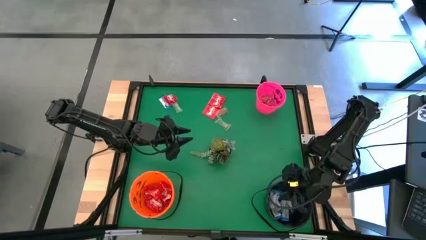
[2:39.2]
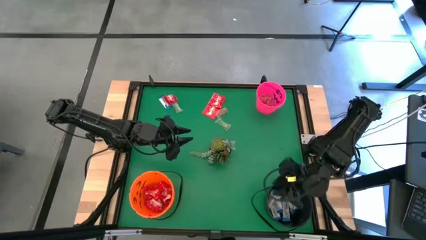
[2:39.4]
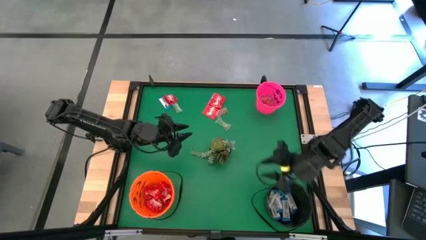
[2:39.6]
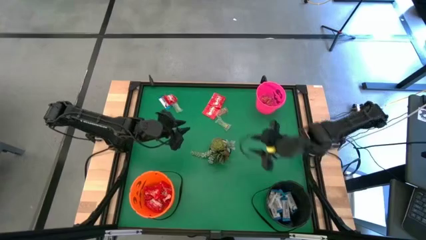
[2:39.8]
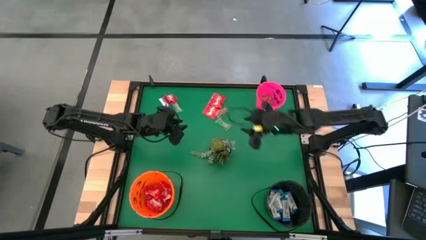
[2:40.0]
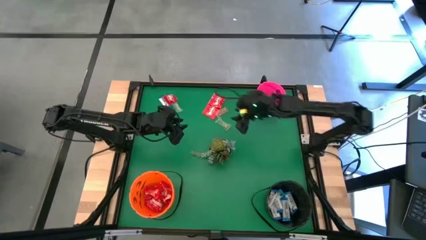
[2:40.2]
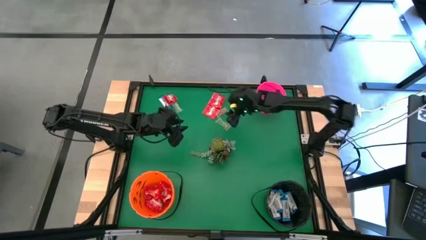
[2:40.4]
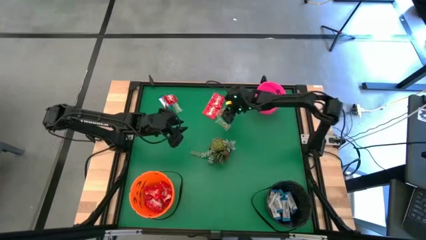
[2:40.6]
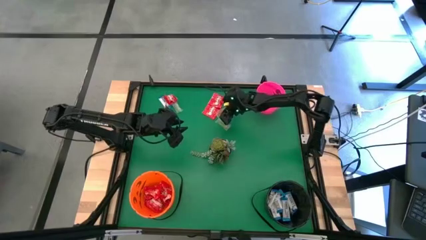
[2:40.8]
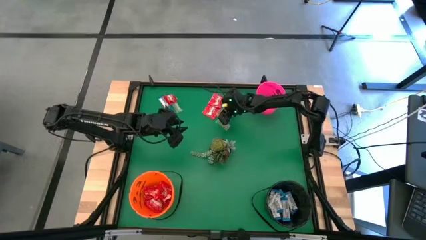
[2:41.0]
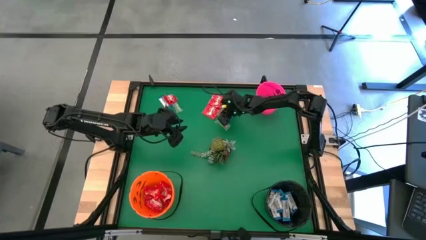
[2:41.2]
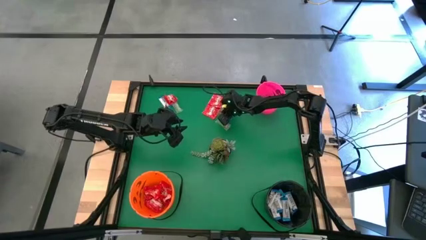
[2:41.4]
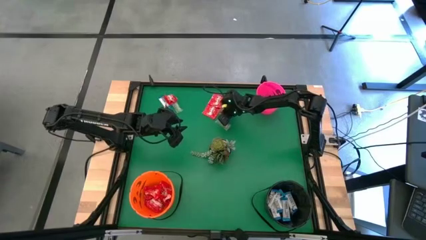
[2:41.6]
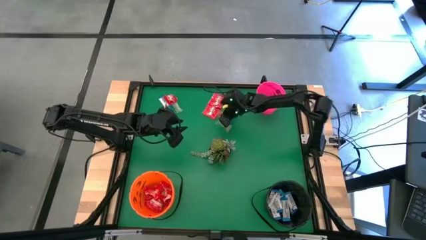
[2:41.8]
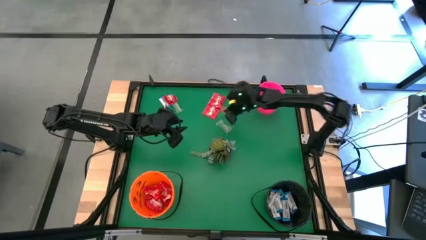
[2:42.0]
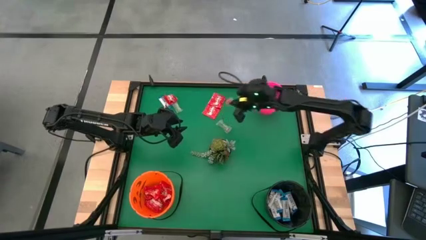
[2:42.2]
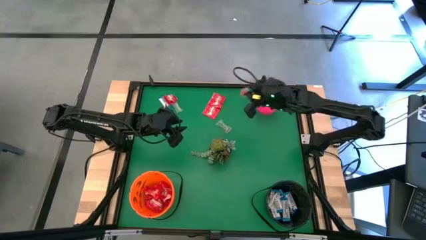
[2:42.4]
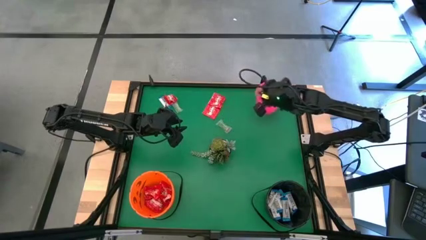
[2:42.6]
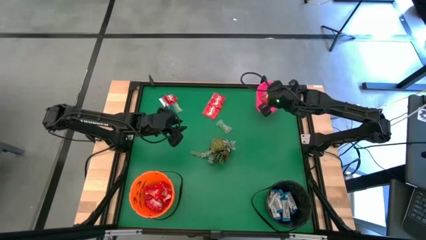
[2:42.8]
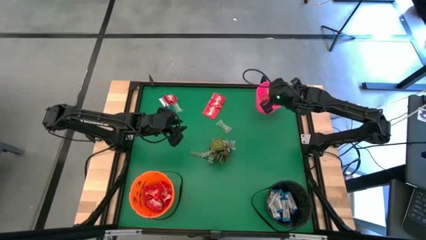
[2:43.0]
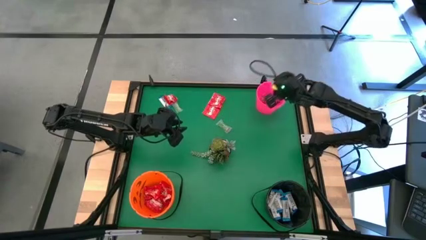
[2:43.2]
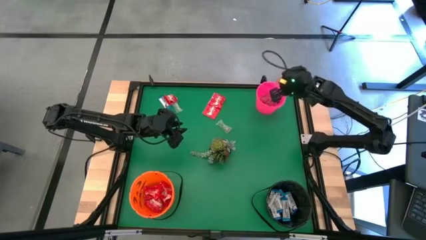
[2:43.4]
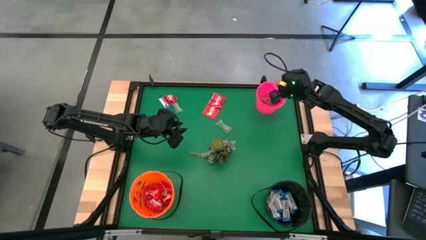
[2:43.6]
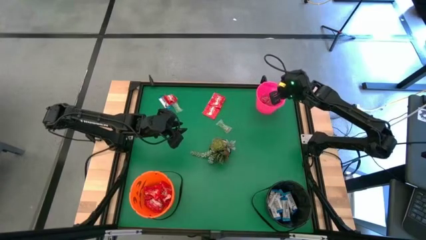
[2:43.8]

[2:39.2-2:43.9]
Task: Sort candy
Put the orange gummy into the pink bucket

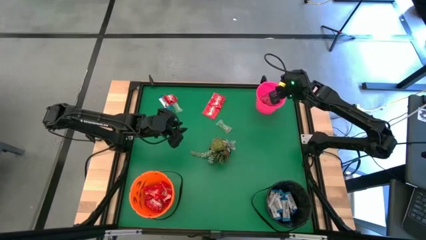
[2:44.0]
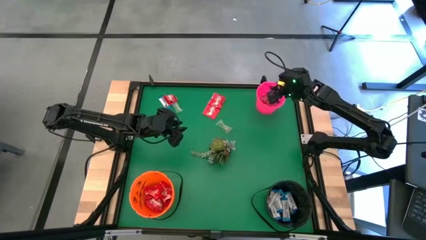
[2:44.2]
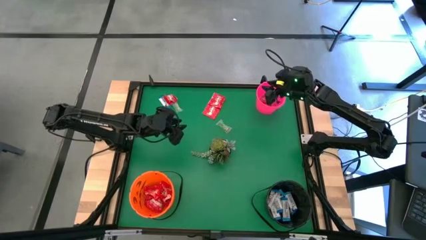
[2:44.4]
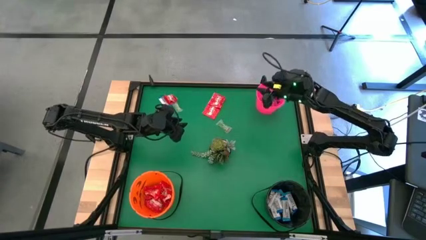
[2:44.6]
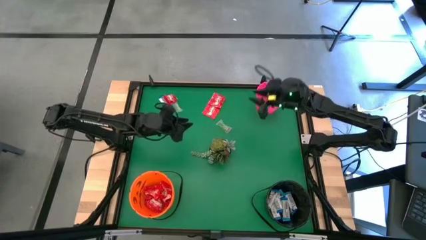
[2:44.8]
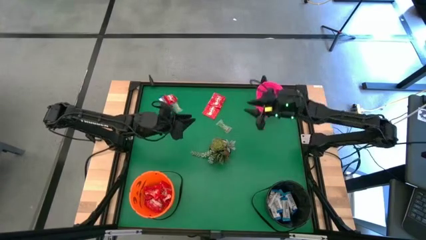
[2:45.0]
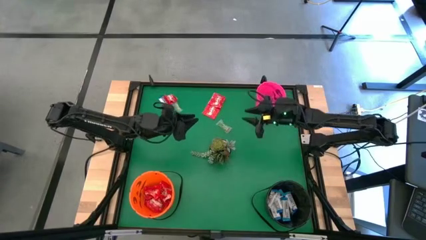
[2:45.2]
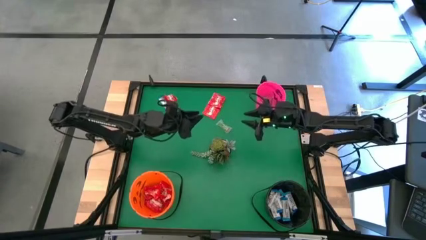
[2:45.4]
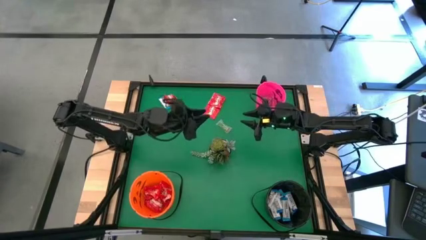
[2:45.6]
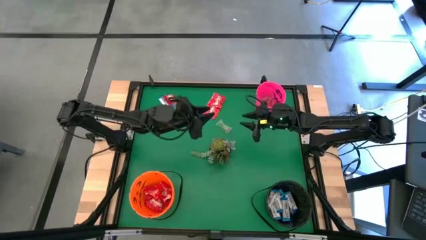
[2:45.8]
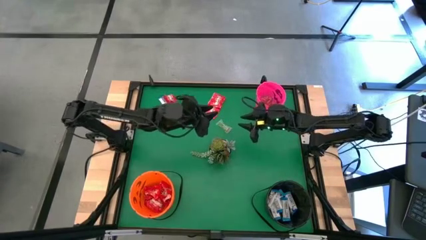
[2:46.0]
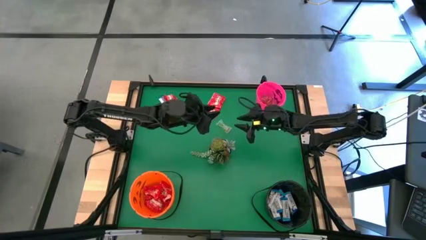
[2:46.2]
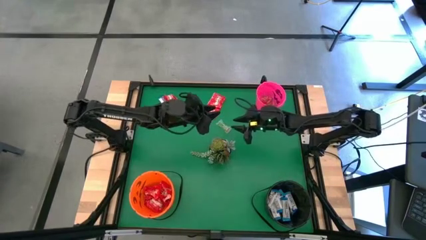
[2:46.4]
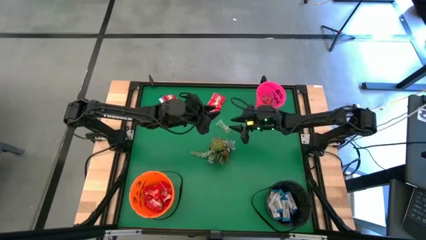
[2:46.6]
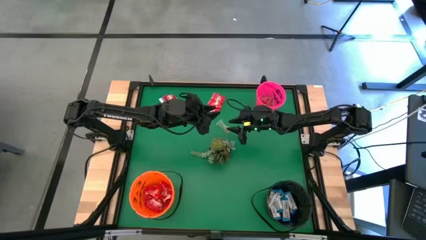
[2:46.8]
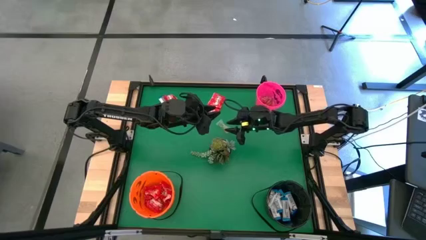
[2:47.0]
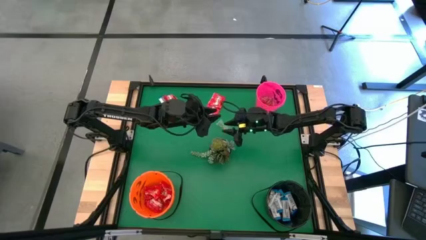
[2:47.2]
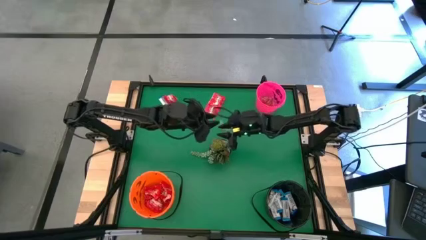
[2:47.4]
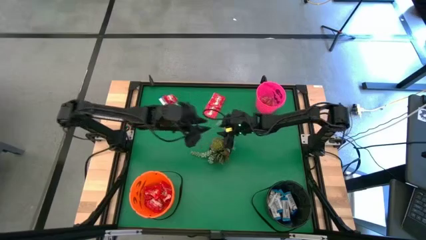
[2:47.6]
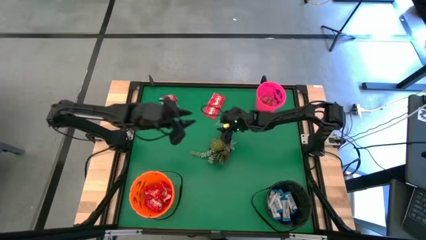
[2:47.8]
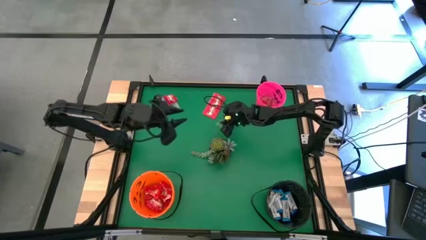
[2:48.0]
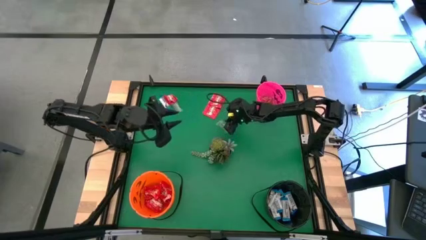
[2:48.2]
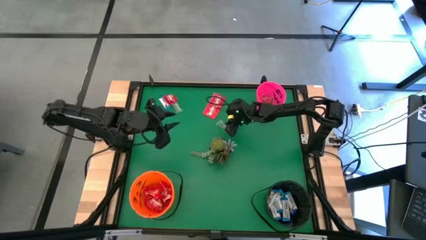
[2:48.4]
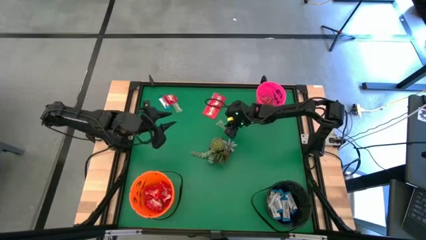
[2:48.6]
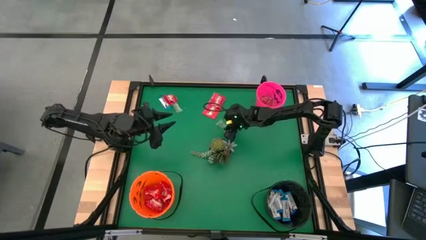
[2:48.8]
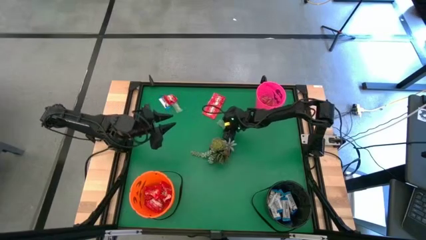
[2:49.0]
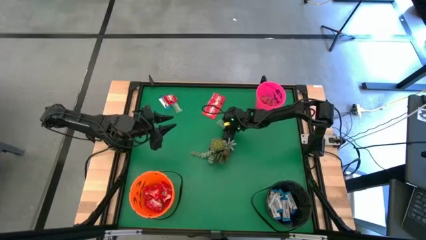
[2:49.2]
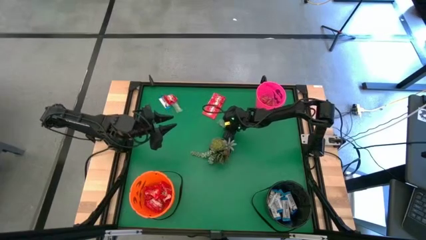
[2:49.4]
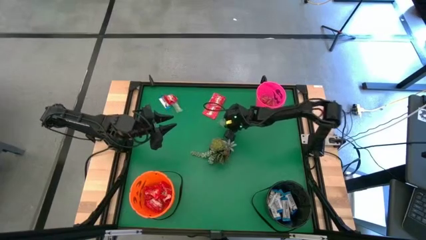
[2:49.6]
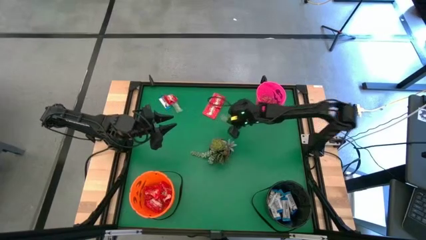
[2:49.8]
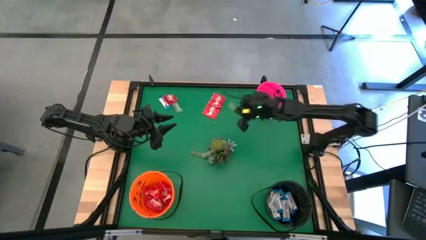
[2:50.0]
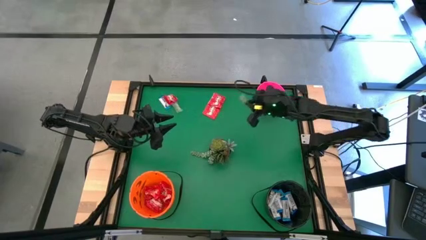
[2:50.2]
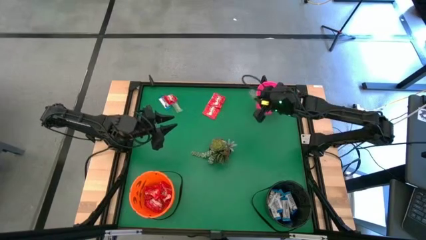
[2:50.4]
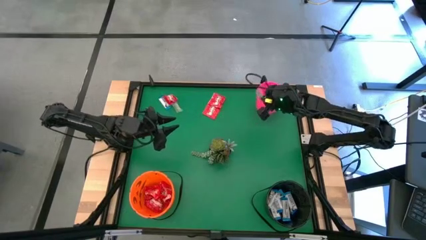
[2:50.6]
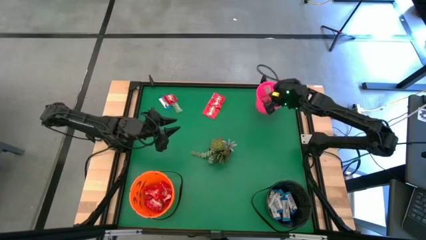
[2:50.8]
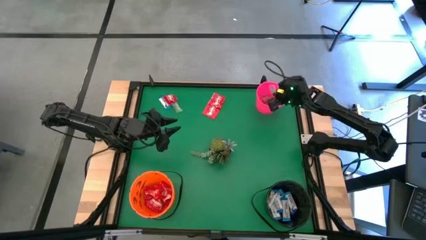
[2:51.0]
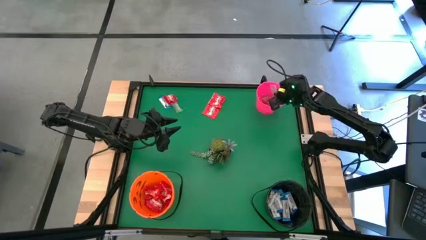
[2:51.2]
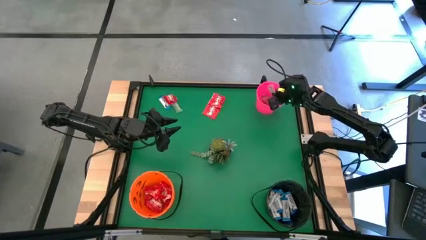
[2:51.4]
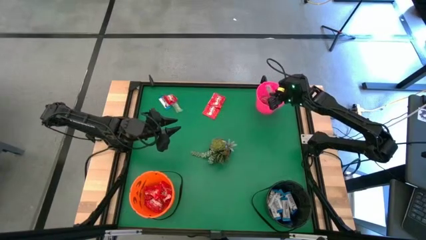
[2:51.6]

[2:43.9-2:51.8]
Put the green gummy into the pink bucket

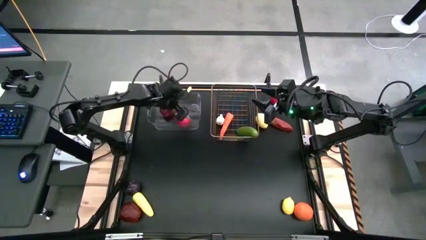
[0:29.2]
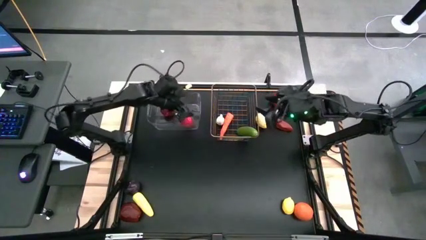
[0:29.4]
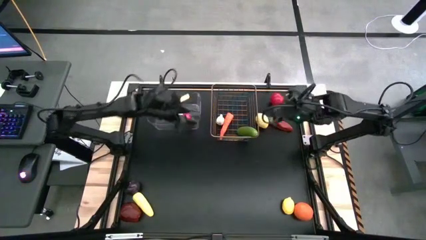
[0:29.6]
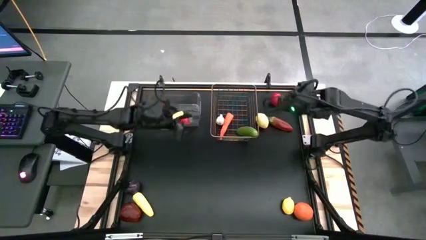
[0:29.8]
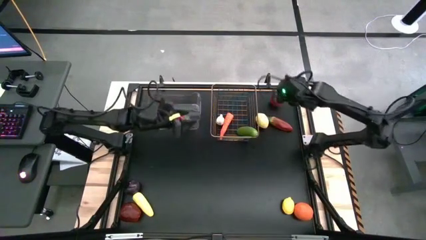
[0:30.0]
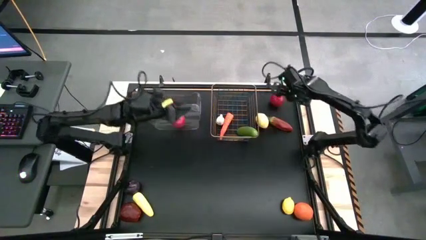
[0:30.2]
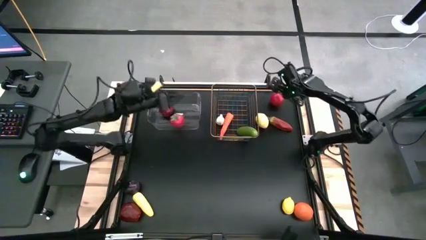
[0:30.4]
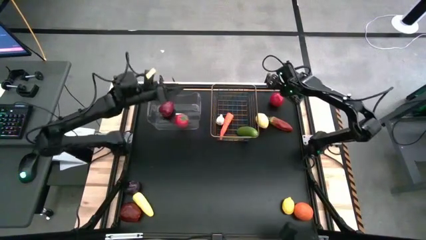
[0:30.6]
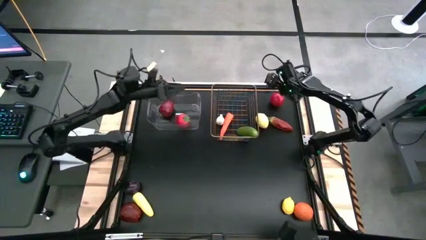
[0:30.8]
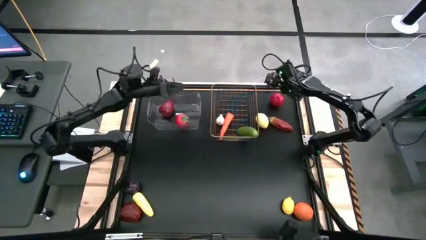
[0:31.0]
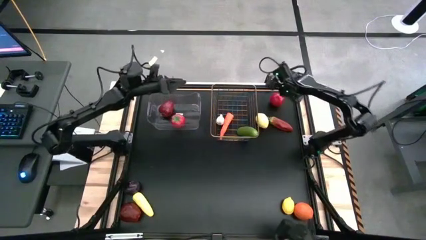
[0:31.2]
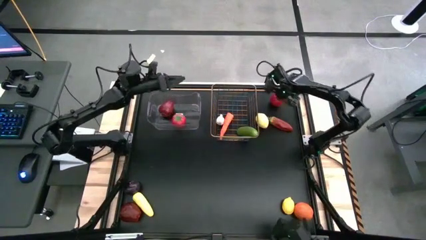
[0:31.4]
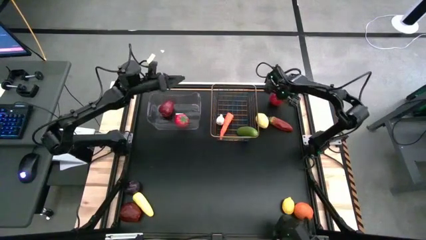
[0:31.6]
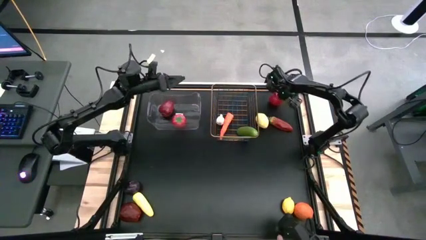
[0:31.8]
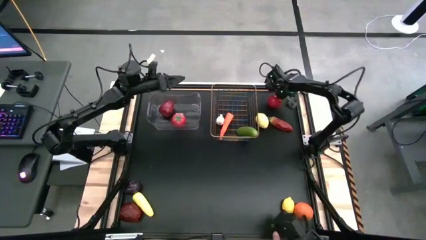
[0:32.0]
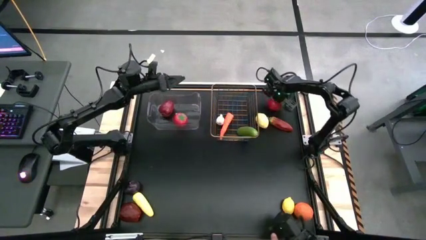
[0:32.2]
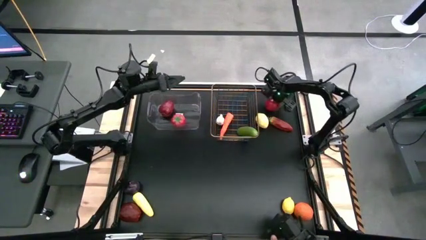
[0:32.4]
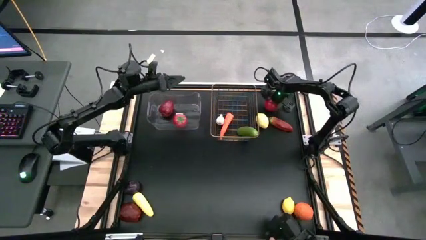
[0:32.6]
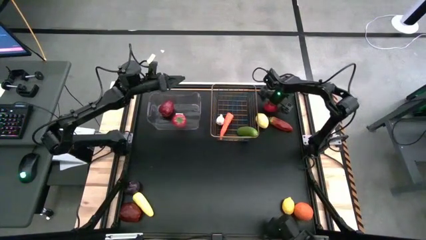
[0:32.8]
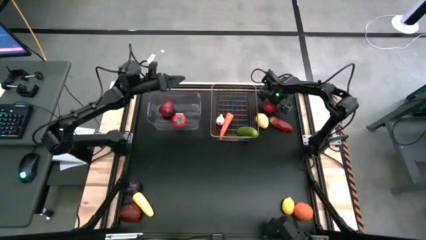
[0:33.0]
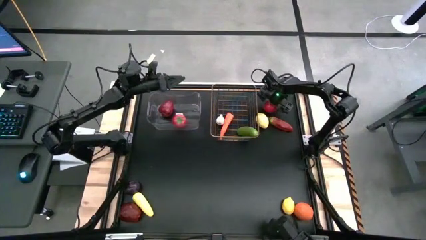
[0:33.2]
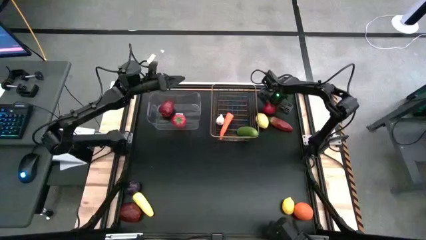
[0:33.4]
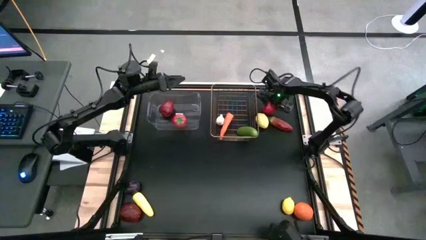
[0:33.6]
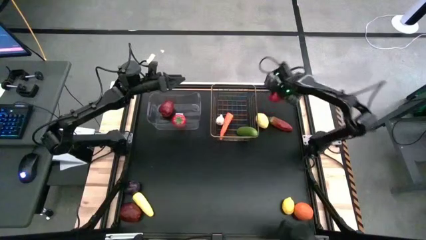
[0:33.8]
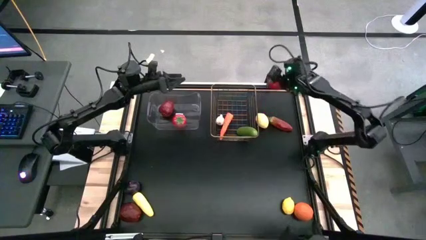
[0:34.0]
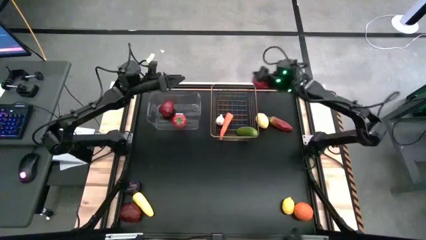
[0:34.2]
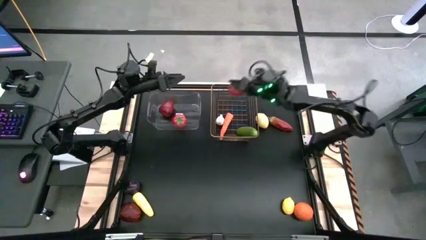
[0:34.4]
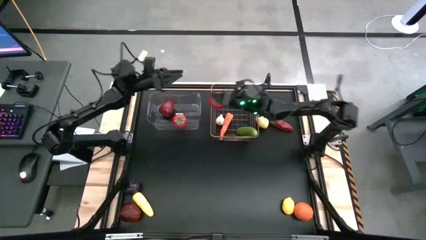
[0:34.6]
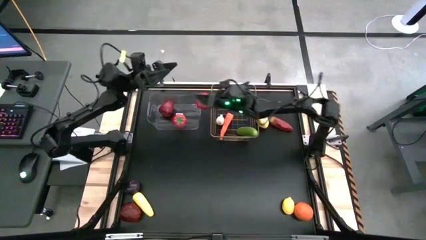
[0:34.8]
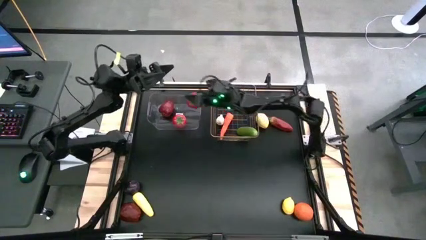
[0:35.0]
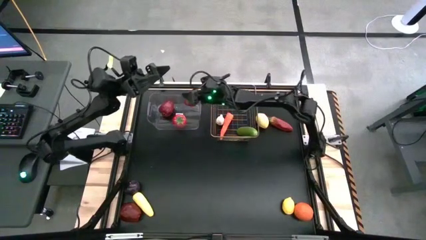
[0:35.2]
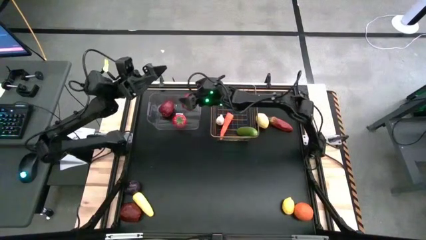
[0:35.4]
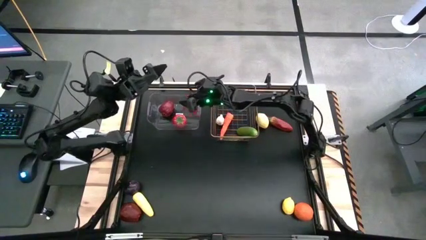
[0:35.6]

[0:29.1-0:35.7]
Task: Sort produce into baskets
Put the tomato into the transparent bin
